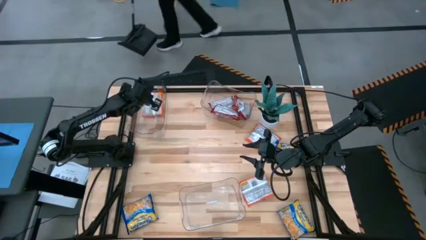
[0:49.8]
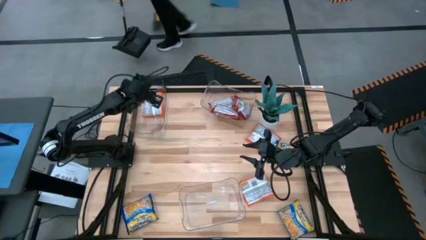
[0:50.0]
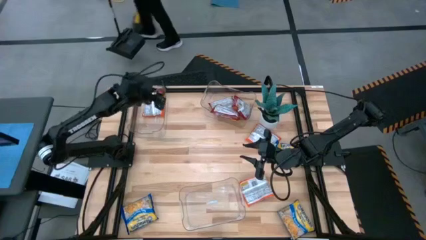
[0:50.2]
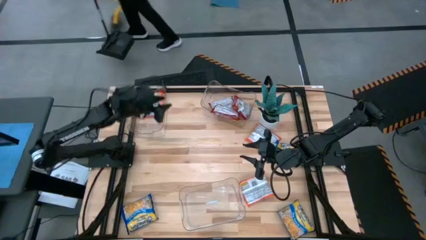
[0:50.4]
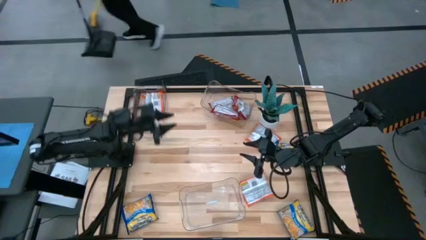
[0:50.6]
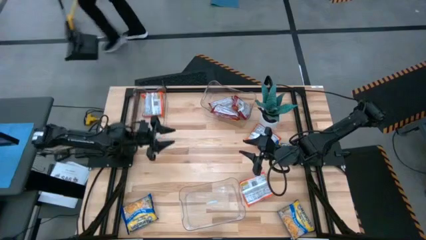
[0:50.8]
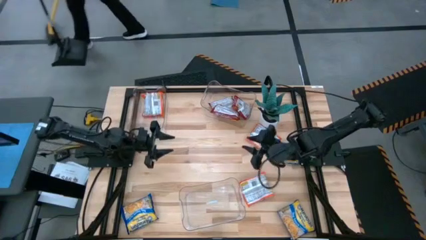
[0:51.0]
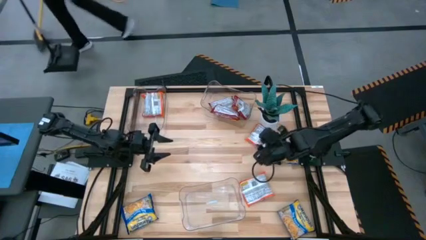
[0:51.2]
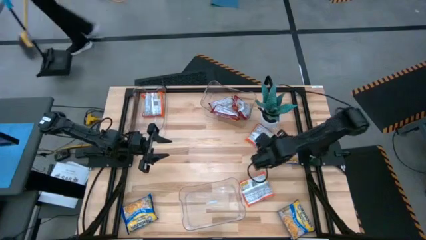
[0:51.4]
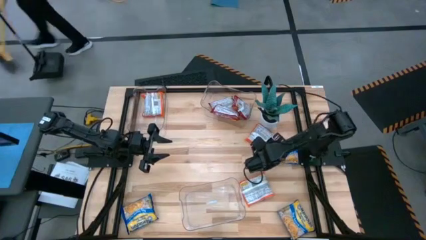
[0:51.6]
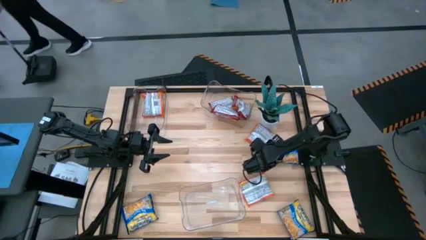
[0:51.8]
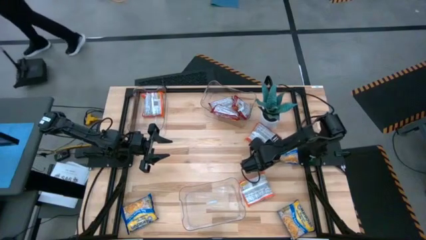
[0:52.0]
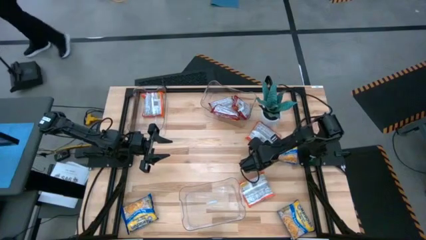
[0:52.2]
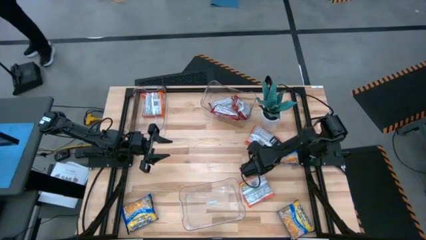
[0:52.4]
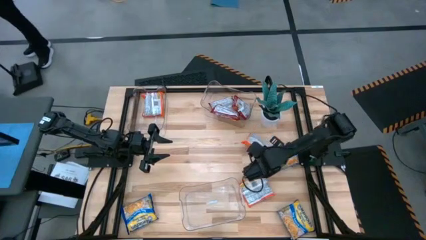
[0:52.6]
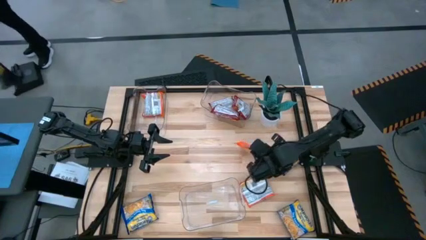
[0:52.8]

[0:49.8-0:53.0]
Task: Sort Maruchan noodles
Put the top orange noodle pack into the top top left transparent bin

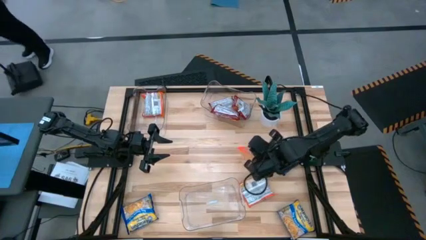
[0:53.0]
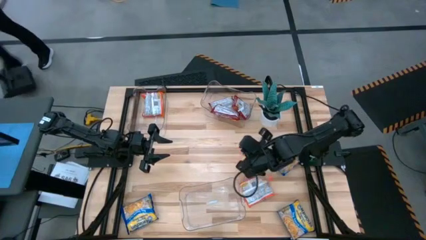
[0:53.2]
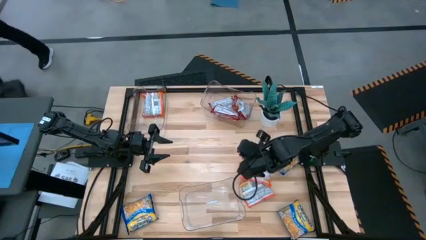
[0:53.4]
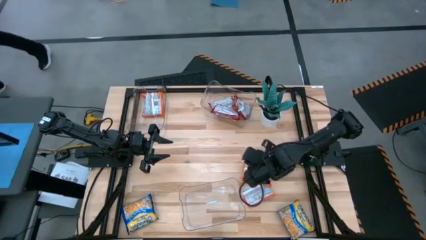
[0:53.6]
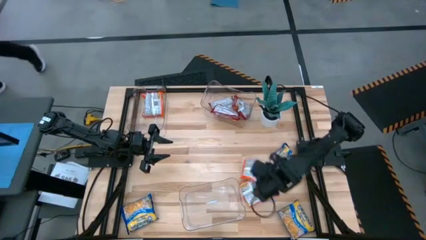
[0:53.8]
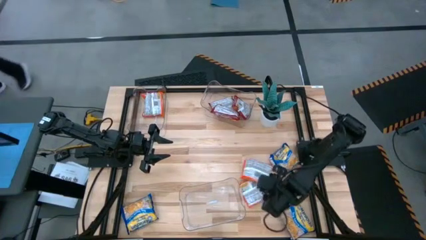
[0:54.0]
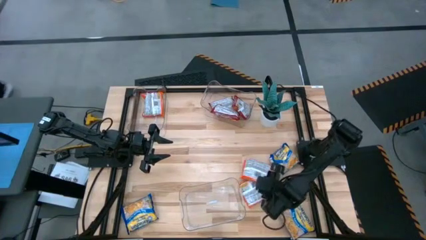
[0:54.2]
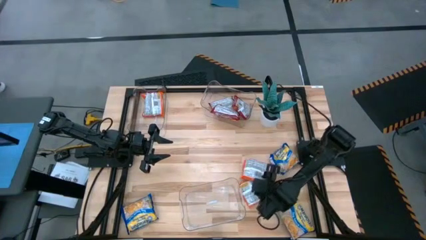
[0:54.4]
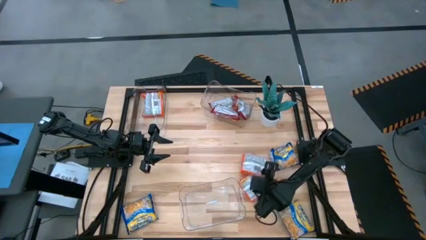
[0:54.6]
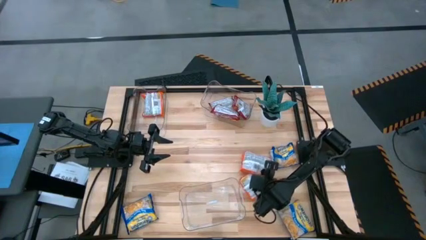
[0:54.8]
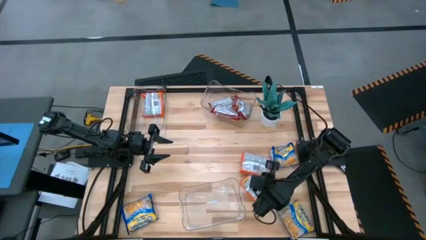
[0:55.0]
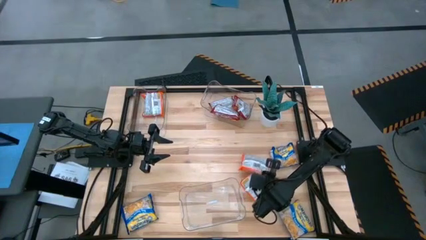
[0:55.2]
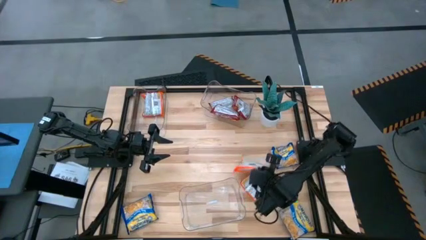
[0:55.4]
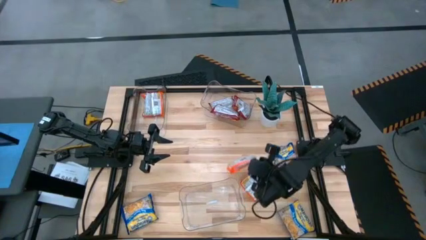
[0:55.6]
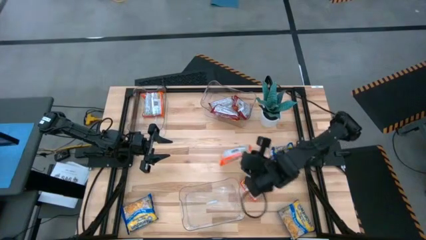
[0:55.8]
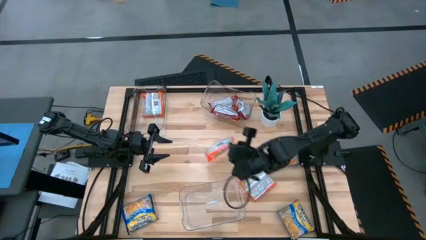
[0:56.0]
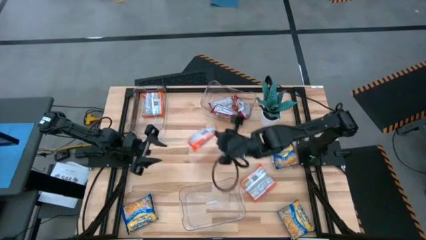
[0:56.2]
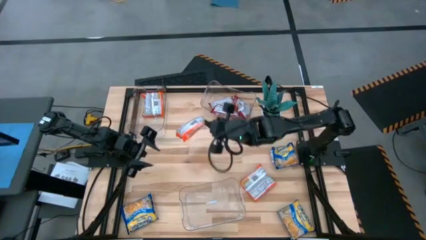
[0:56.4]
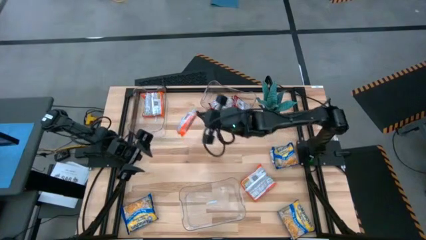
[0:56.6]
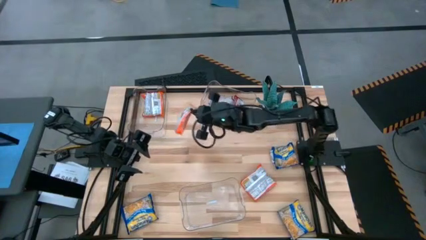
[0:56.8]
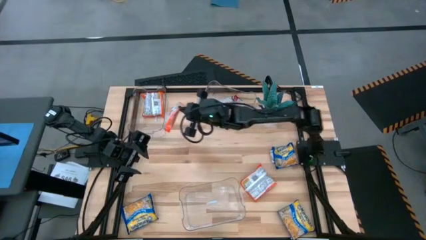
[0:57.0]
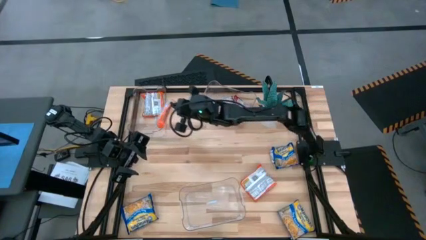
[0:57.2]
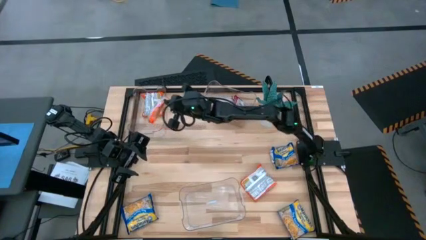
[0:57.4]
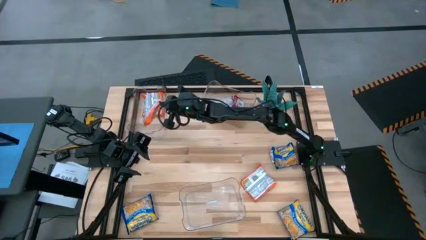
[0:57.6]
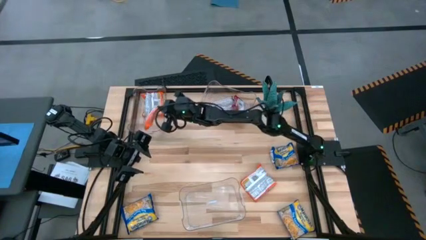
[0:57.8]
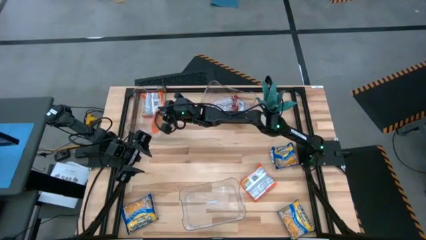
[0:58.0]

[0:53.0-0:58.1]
Put the top orange noodle pack into the top top left transparent bin

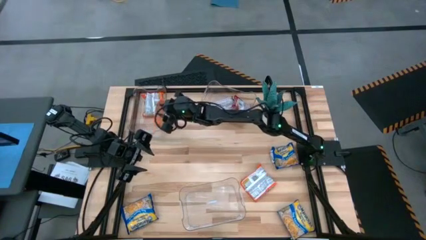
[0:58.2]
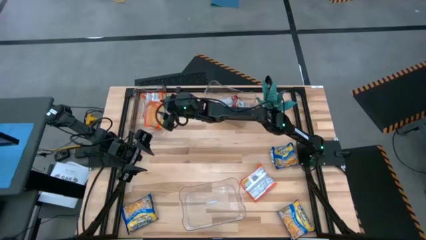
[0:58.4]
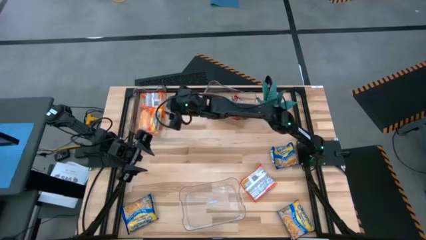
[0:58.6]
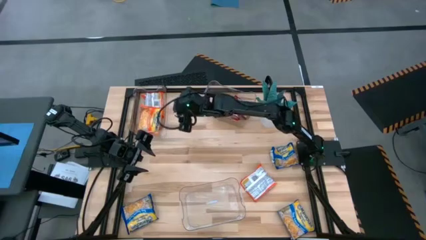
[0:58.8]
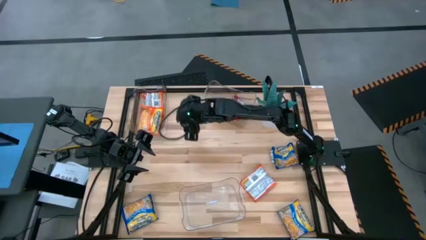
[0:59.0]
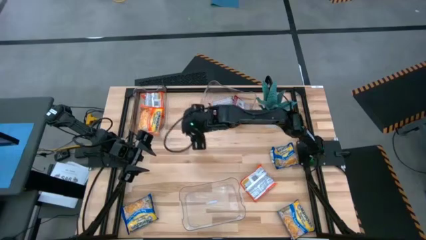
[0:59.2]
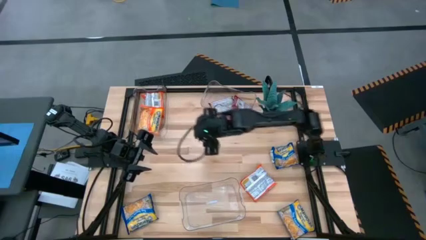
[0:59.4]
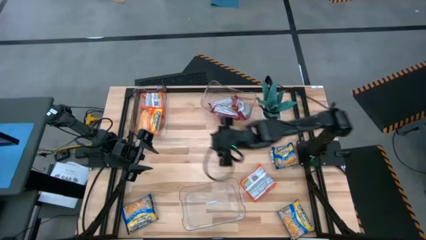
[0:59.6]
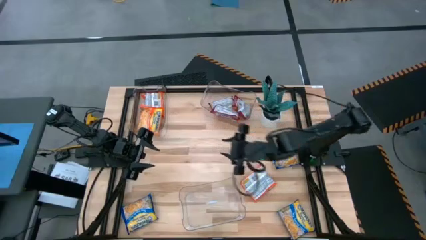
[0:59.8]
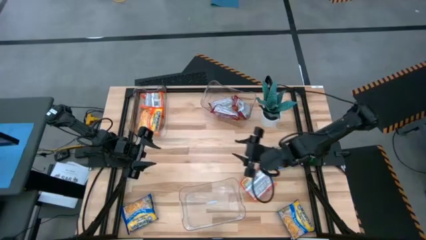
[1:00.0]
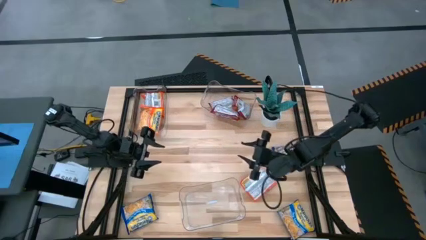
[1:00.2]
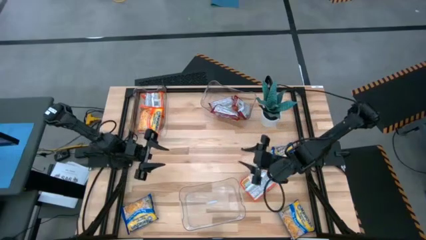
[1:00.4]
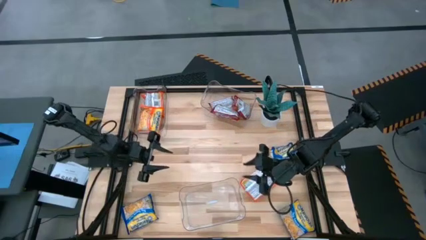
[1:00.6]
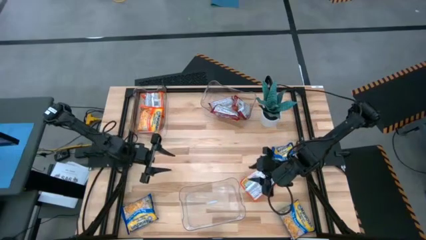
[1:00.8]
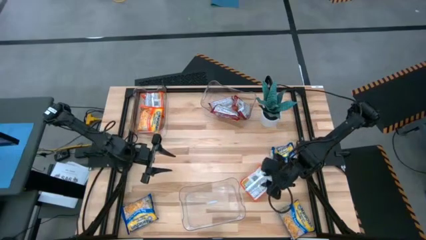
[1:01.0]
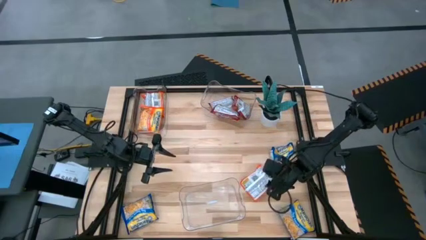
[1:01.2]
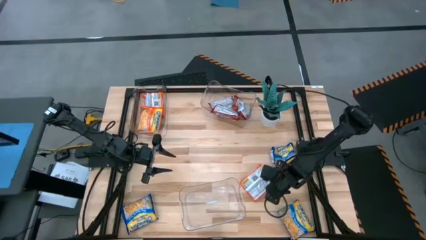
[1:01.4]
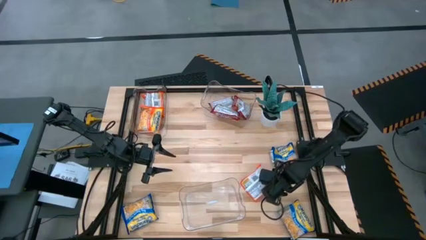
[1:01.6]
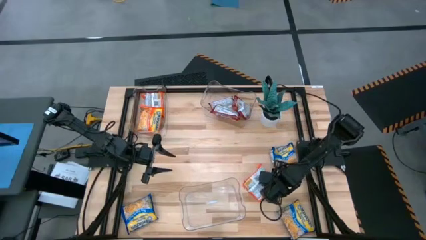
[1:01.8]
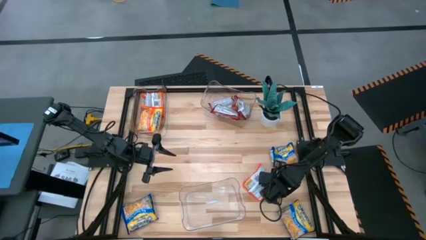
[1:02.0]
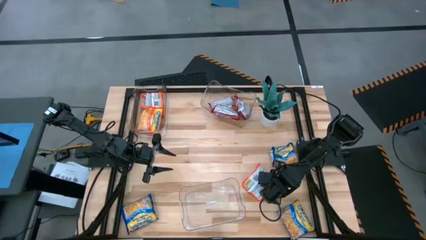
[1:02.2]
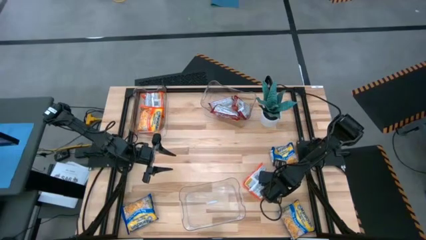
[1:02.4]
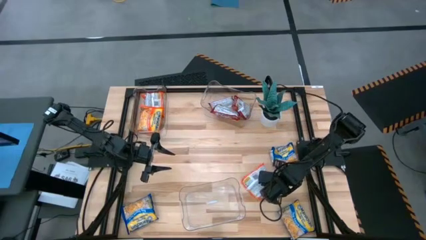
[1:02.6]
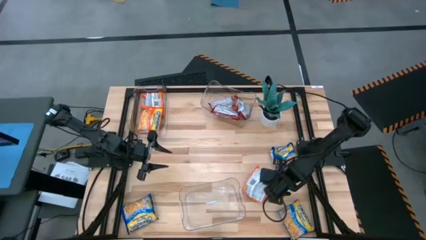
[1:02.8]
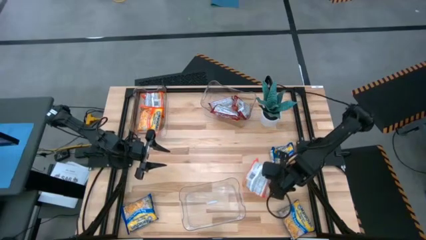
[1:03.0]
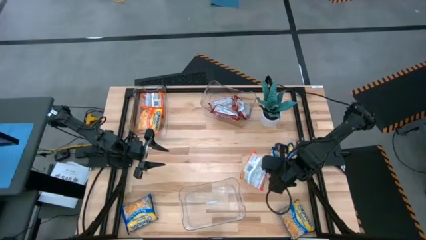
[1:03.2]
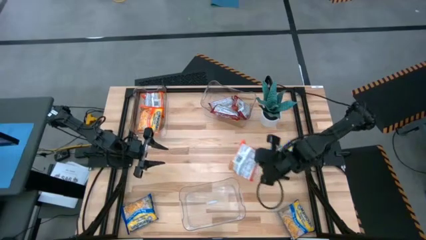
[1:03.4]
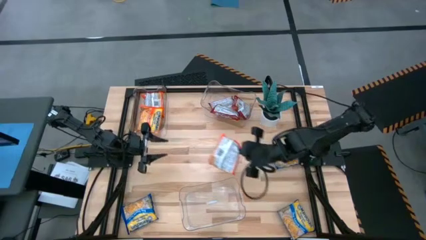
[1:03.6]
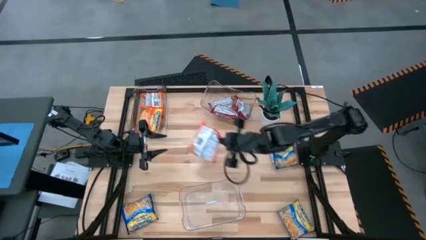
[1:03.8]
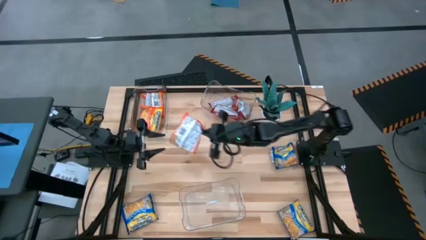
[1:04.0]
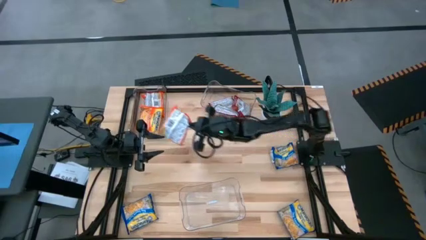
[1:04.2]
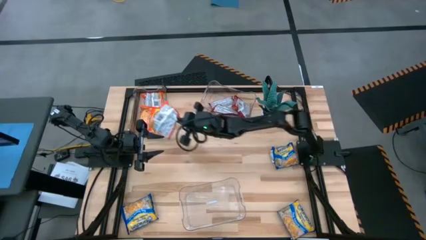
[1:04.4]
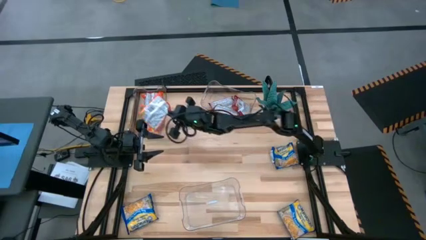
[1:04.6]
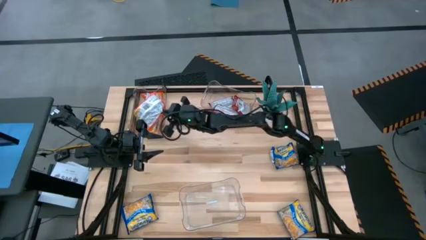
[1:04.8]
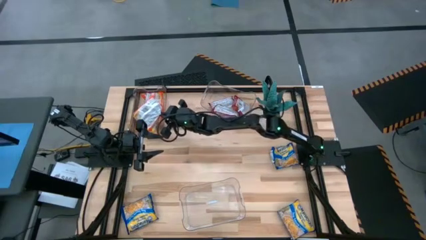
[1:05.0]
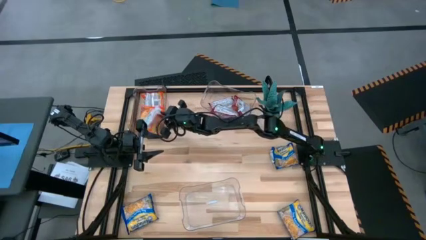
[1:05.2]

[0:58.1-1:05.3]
Put the orange noodle pack into the top top left transparent bin

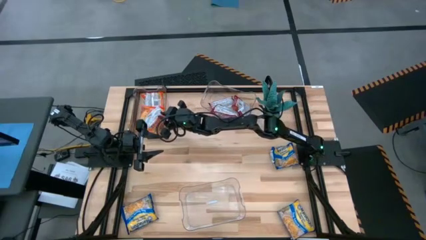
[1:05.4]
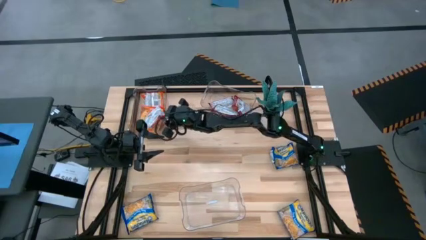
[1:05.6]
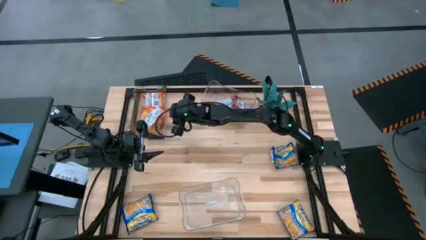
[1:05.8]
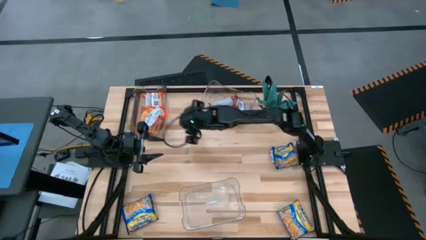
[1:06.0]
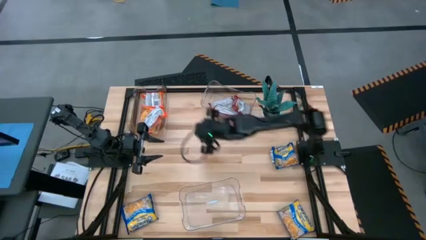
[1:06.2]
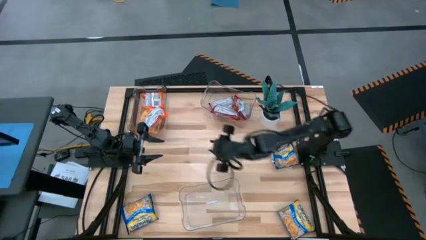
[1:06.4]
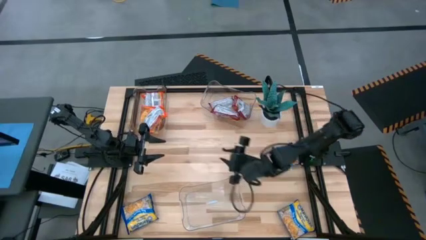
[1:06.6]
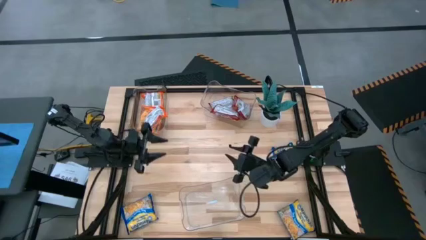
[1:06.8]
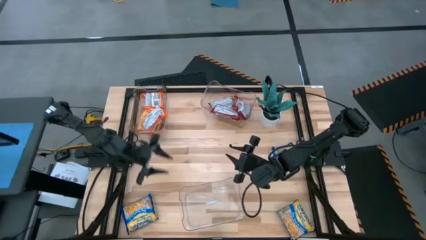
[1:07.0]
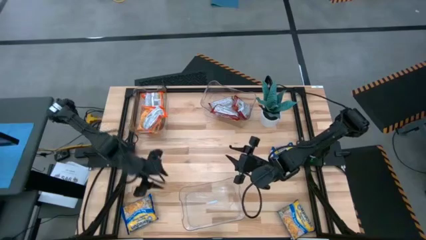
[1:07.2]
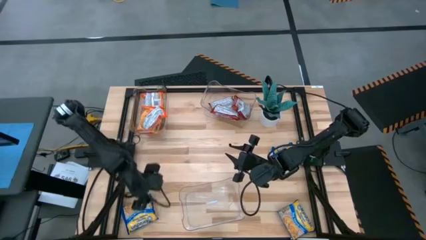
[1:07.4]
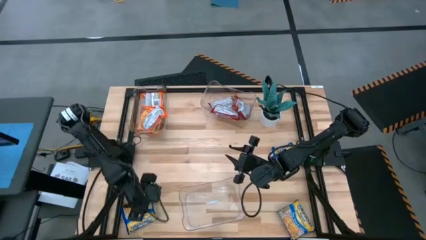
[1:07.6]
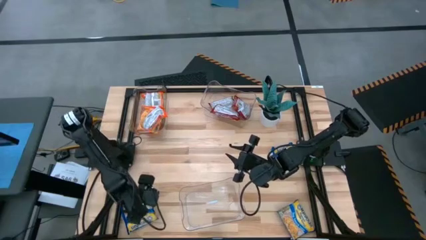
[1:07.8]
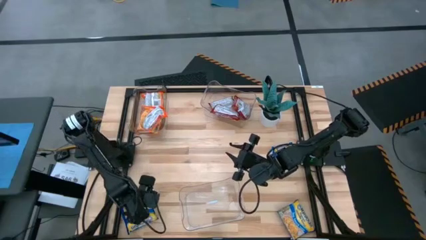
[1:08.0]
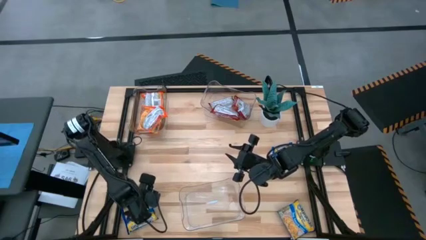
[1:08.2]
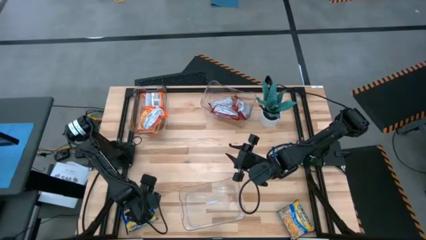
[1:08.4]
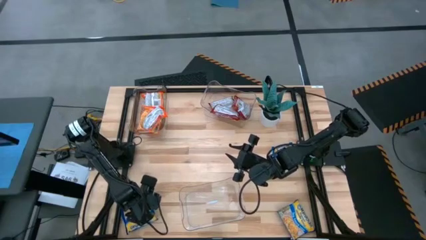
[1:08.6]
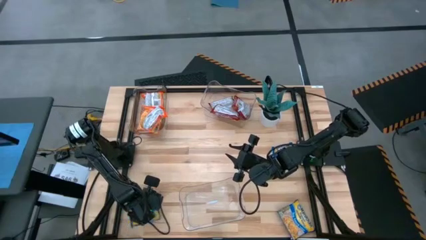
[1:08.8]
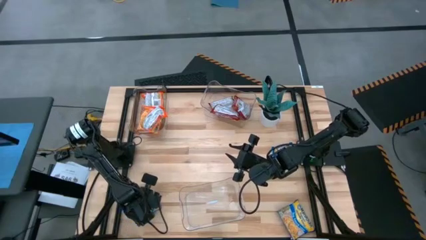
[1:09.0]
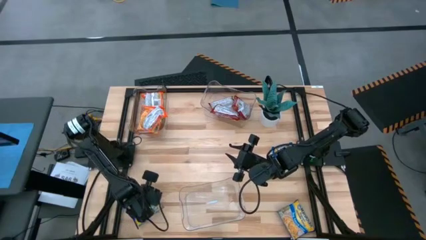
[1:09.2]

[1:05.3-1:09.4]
Put the bottom left blue noodle pack into the bottom transparent bin
